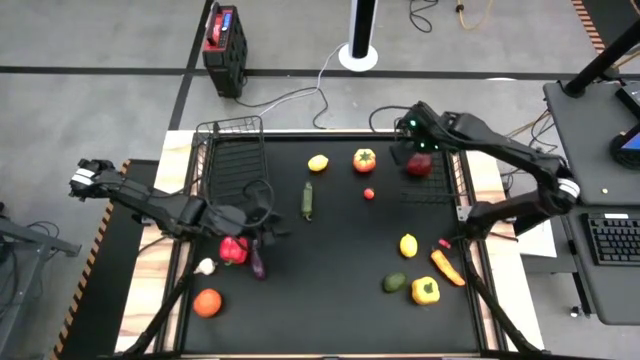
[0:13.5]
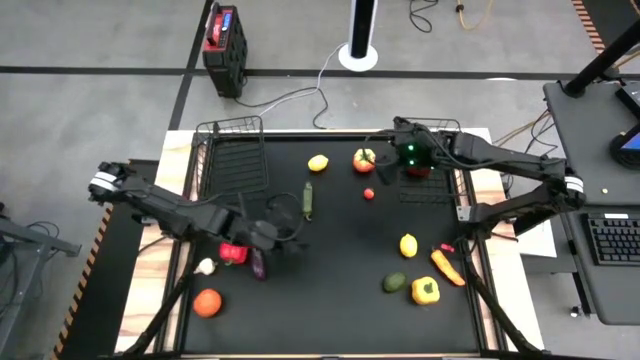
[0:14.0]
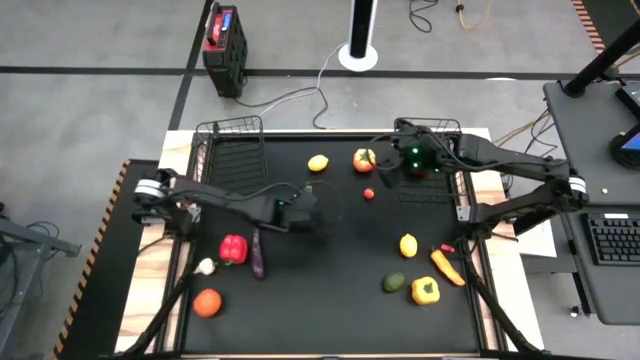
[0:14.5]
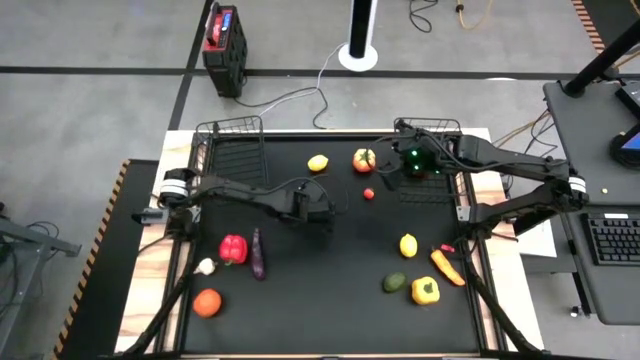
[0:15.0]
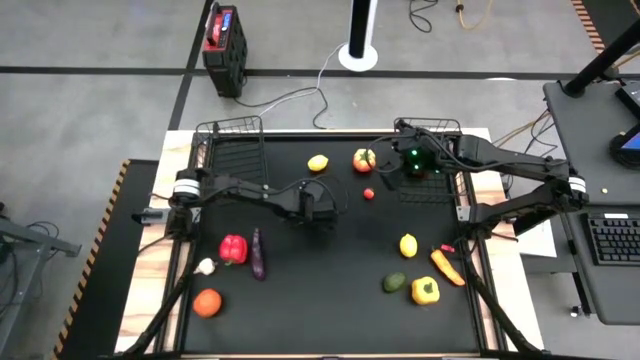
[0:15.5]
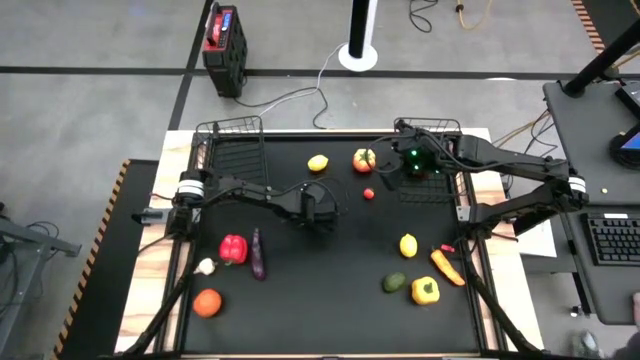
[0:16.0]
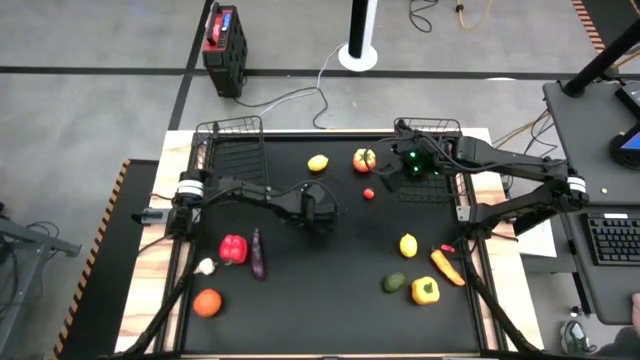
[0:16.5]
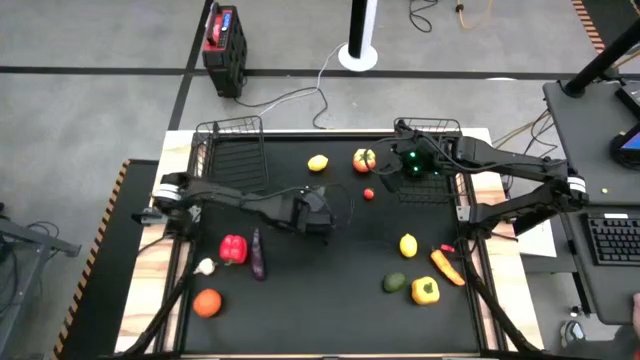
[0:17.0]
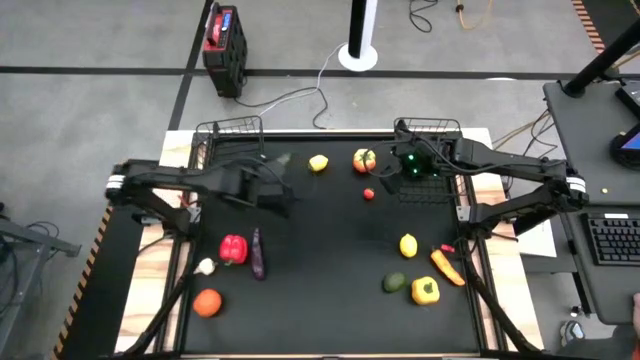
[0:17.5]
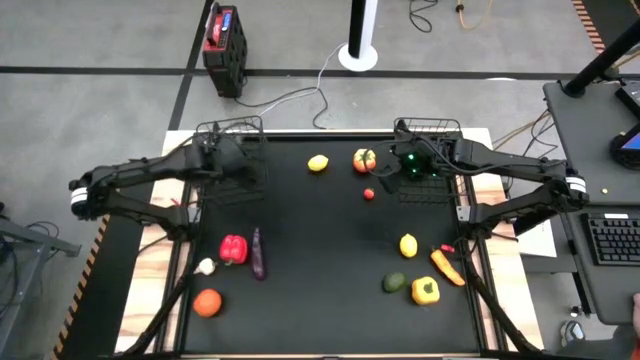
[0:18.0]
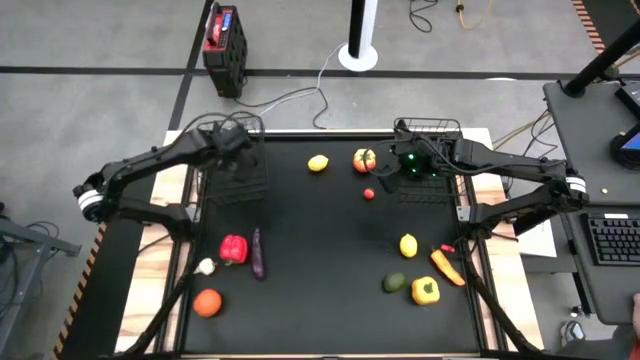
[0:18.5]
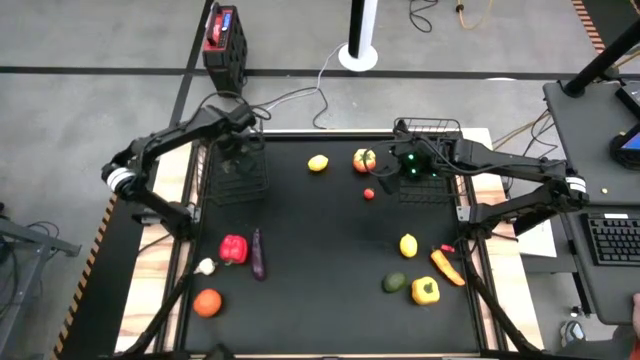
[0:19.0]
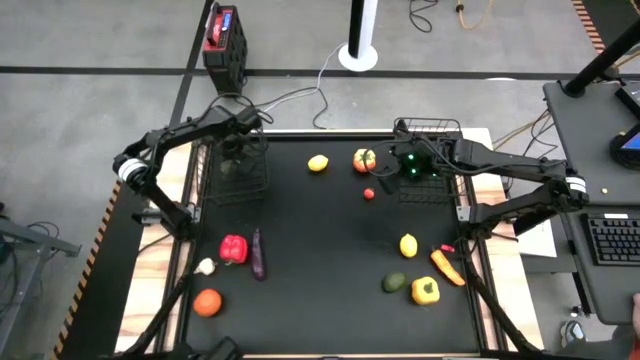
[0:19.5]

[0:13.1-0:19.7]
Task: Sort produce into baskets
Put the green chili pepper into the left wire basket

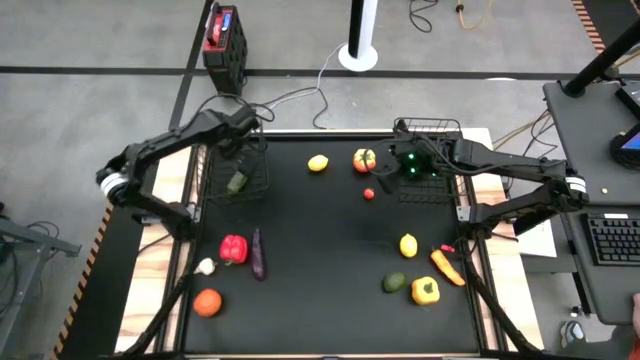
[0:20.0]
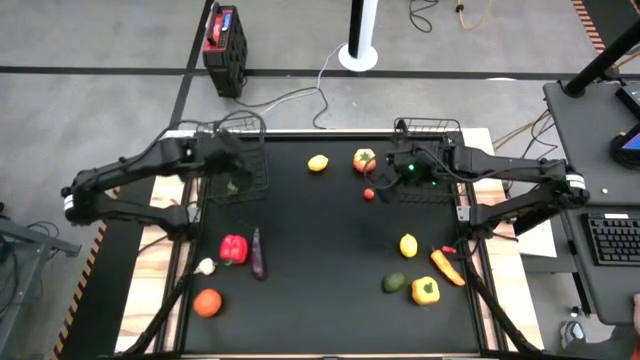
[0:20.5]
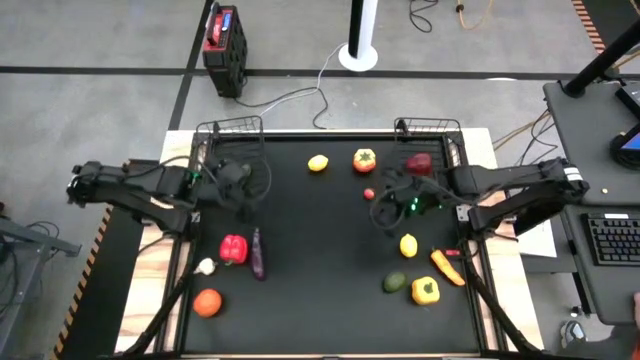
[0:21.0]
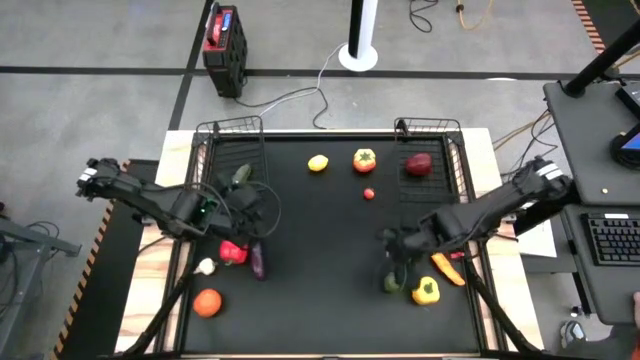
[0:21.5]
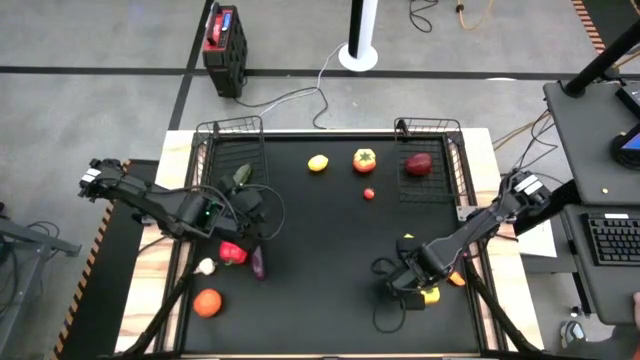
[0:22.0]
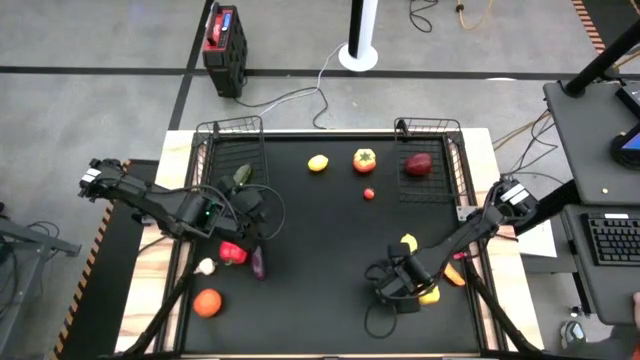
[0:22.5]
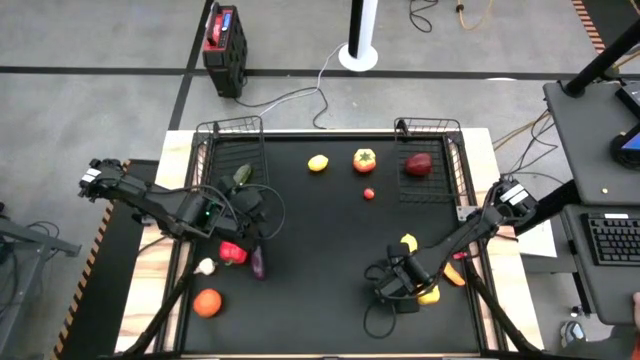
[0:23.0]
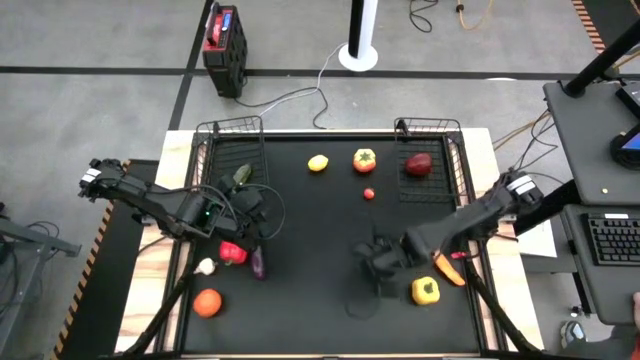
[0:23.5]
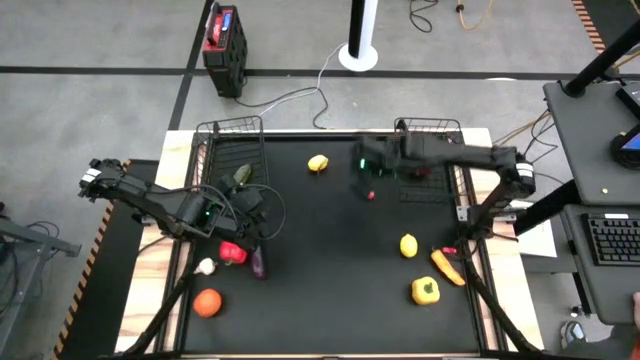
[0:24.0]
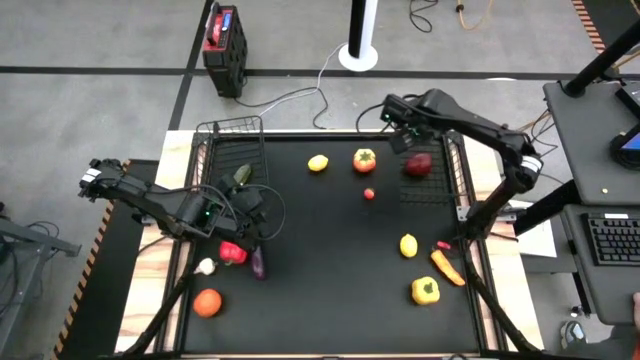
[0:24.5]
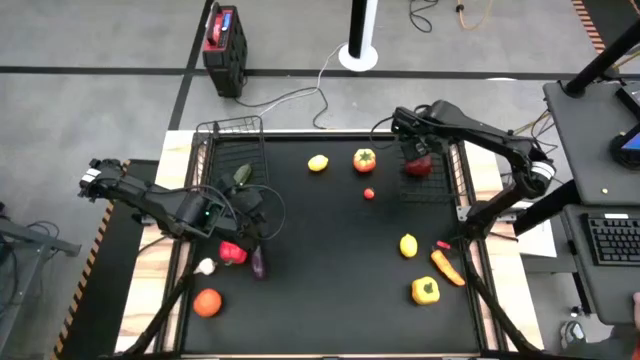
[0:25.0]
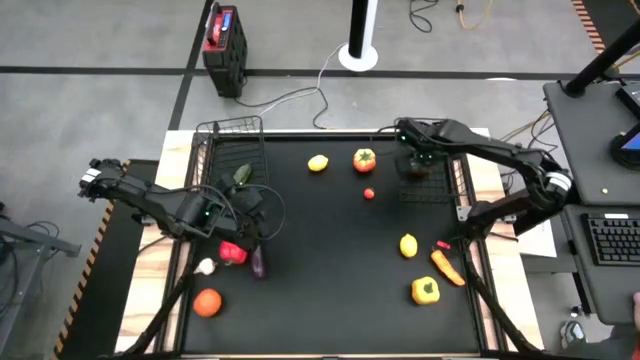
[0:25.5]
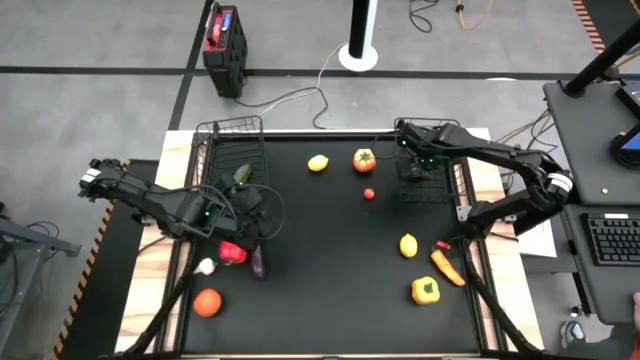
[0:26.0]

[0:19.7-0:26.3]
Put the green lime into the right wire basket

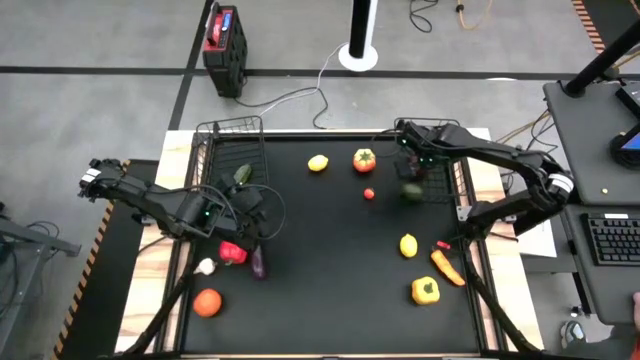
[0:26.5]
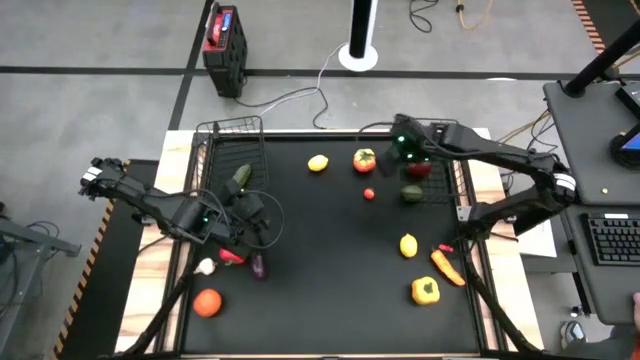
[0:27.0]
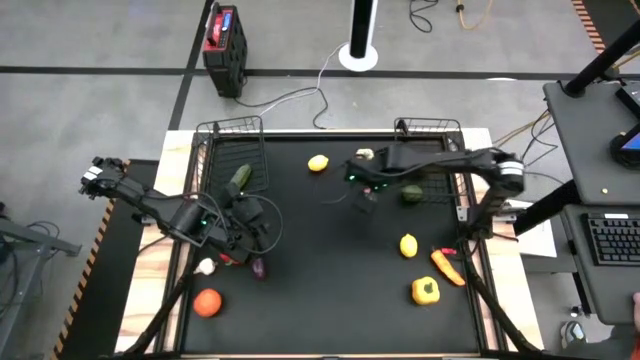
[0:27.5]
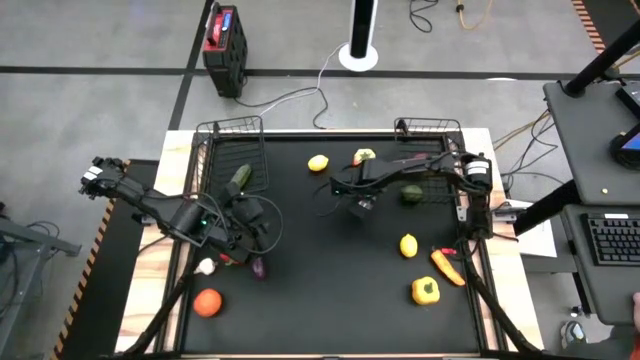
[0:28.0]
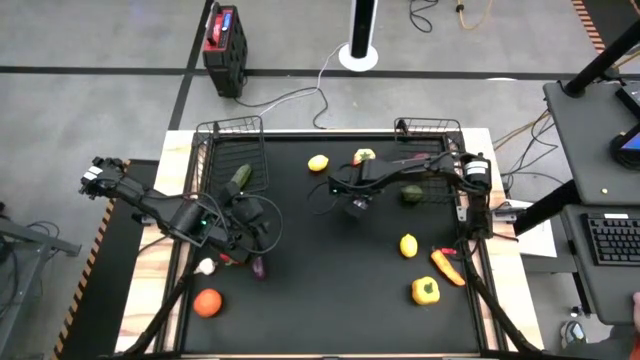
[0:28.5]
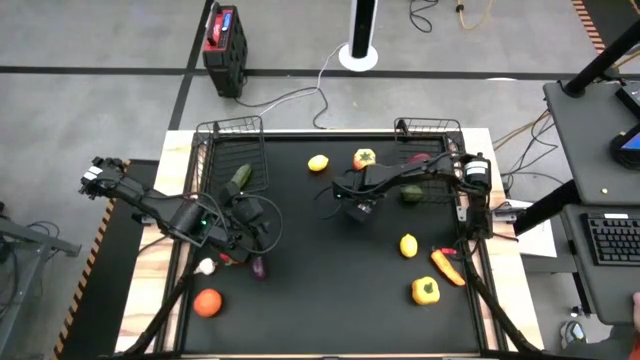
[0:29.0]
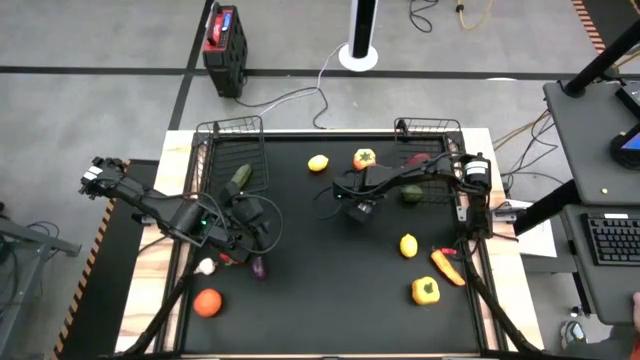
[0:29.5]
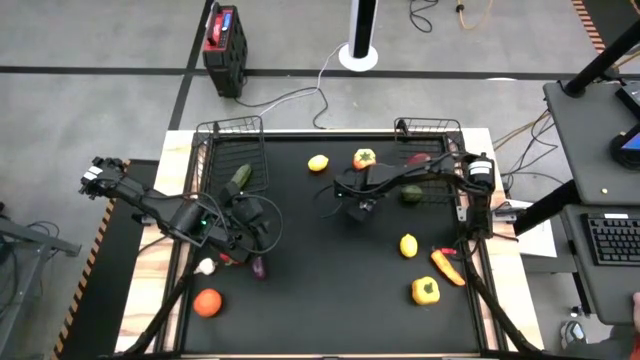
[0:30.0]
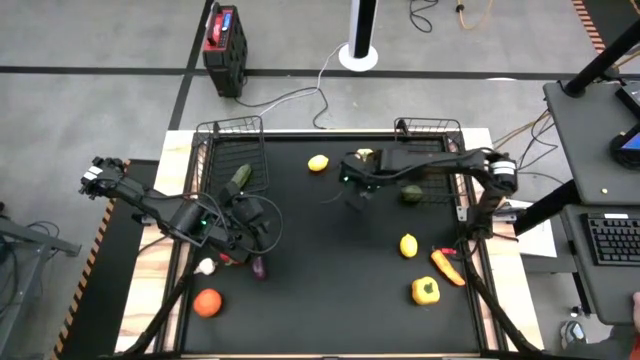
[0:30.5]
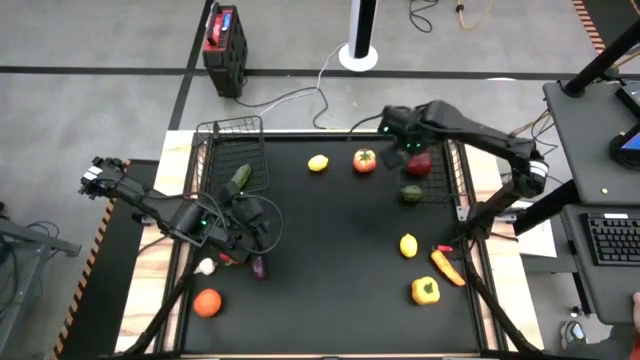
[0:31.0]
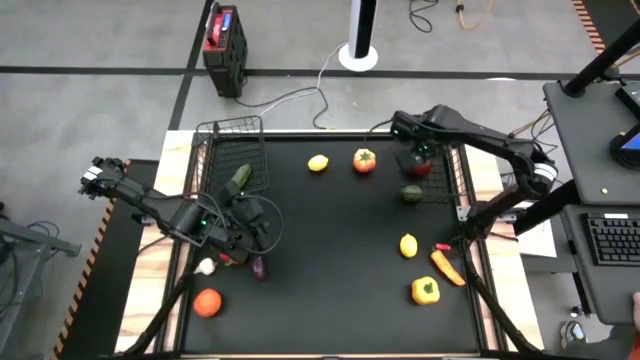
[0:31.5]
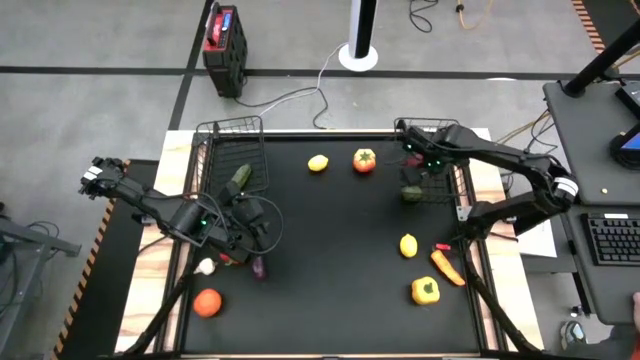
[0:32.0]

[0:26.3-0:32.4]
Put the red tomato into the right wire basket
